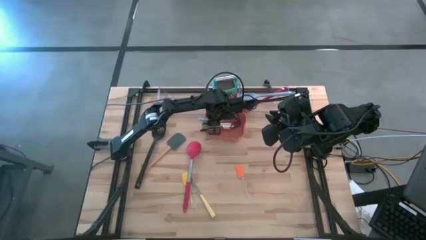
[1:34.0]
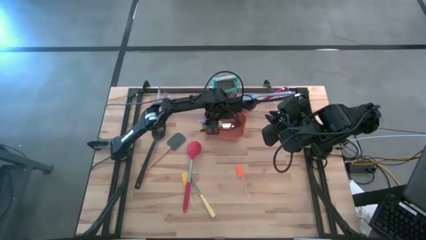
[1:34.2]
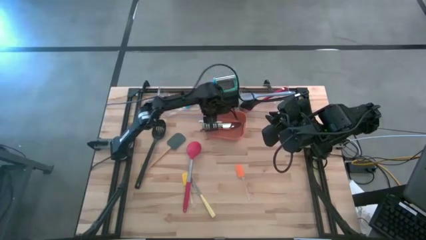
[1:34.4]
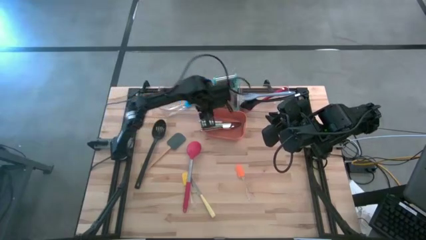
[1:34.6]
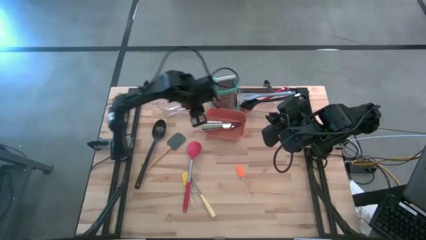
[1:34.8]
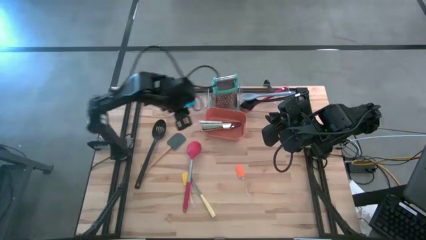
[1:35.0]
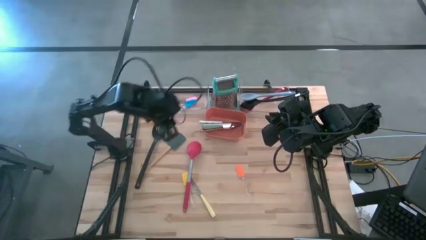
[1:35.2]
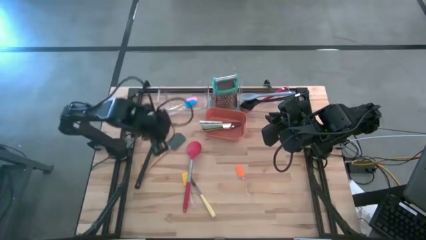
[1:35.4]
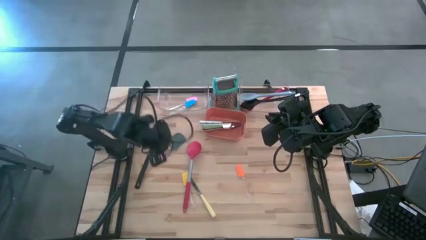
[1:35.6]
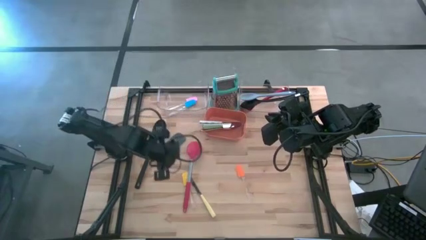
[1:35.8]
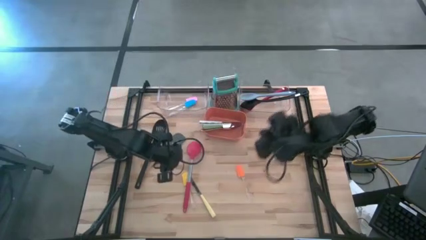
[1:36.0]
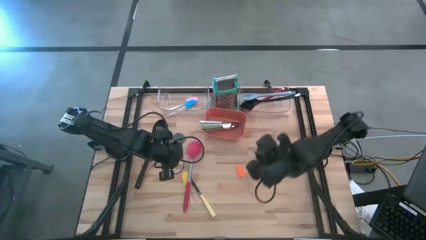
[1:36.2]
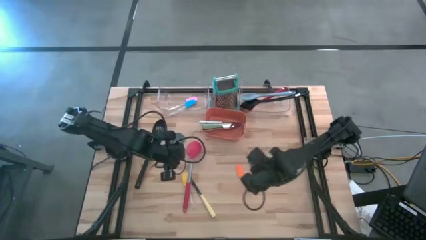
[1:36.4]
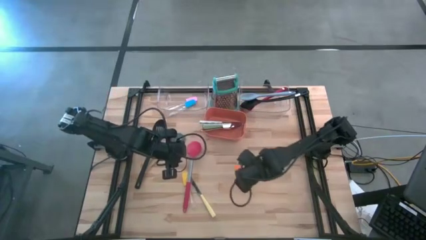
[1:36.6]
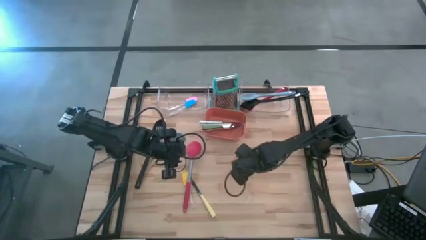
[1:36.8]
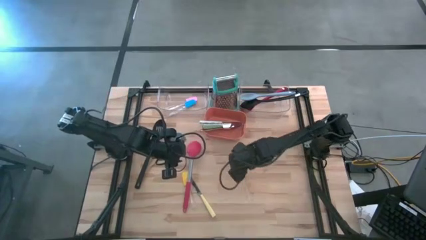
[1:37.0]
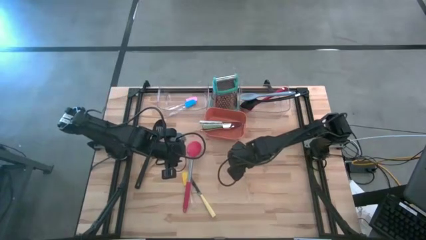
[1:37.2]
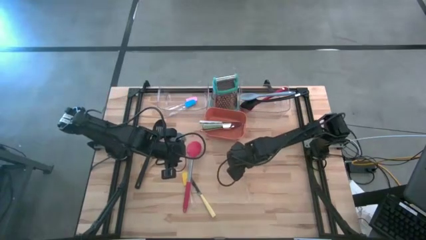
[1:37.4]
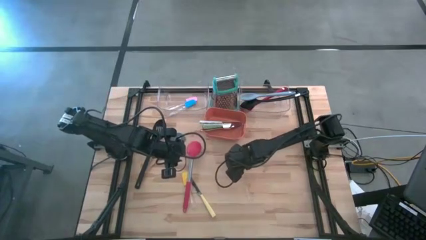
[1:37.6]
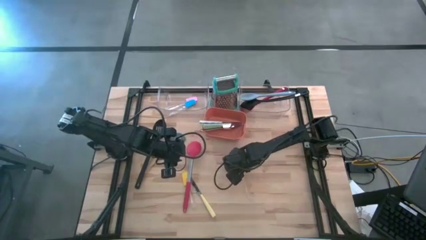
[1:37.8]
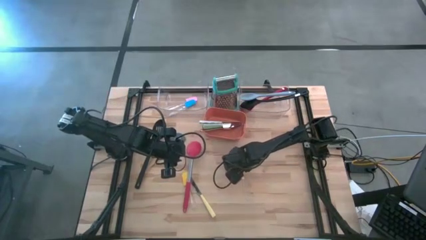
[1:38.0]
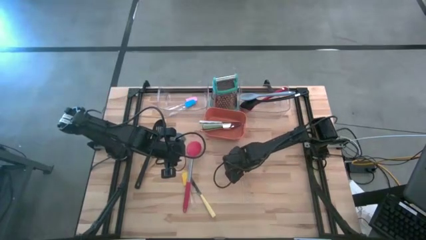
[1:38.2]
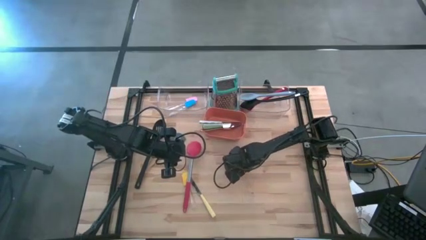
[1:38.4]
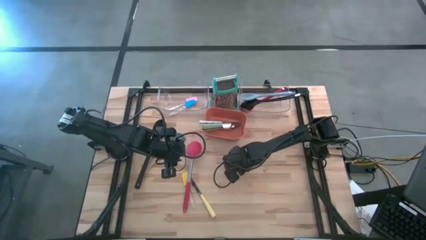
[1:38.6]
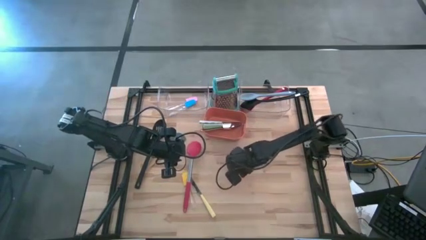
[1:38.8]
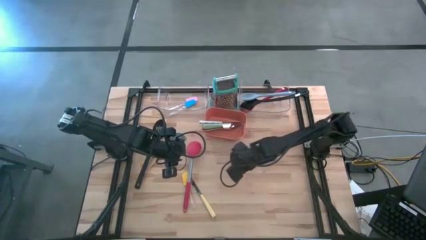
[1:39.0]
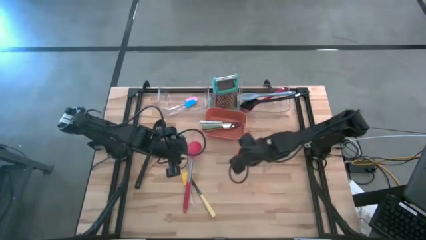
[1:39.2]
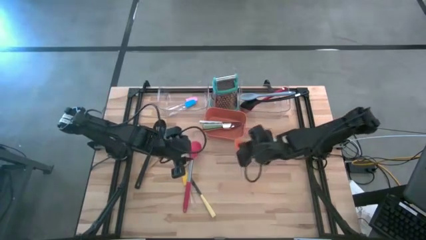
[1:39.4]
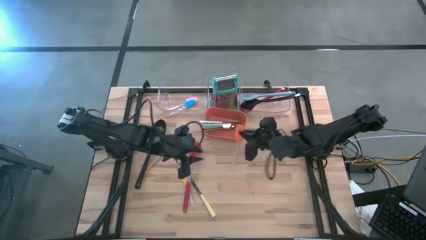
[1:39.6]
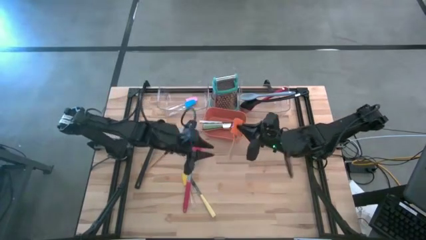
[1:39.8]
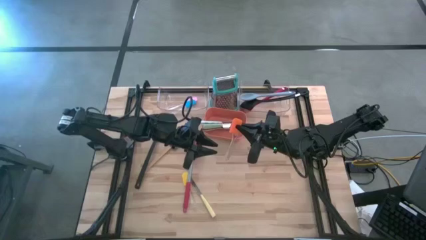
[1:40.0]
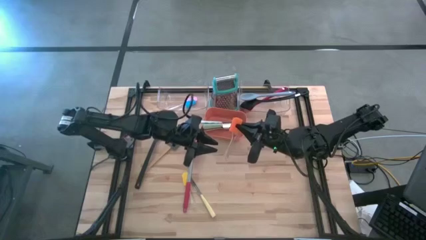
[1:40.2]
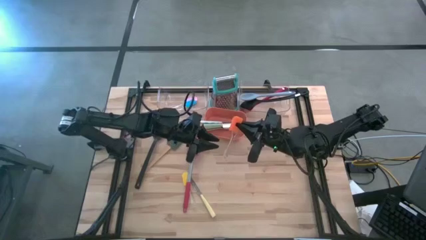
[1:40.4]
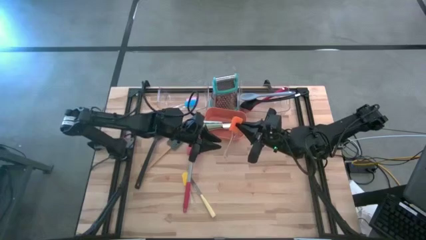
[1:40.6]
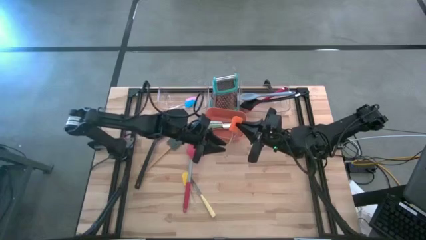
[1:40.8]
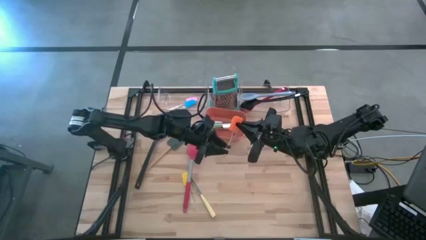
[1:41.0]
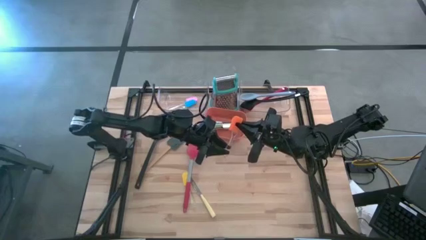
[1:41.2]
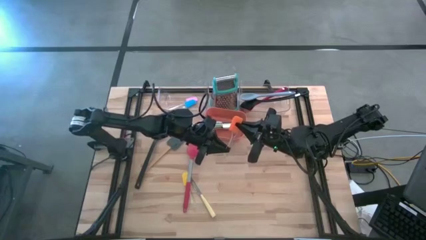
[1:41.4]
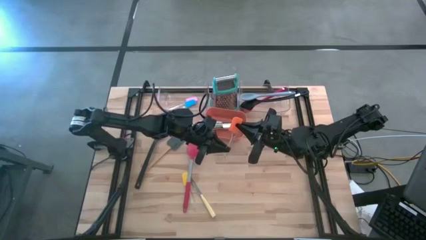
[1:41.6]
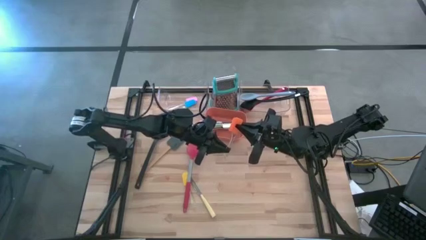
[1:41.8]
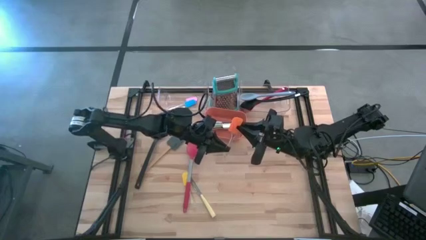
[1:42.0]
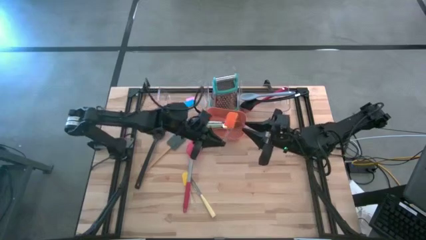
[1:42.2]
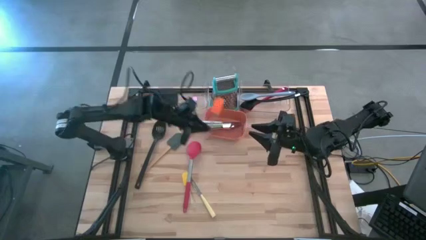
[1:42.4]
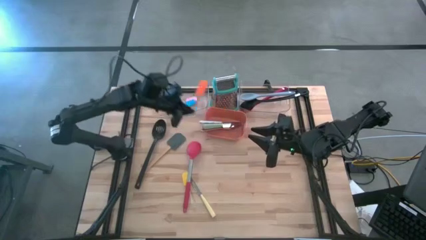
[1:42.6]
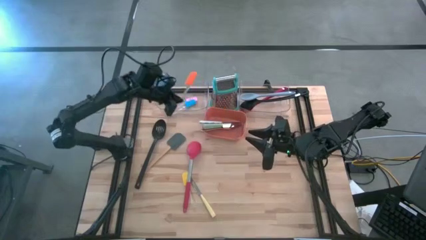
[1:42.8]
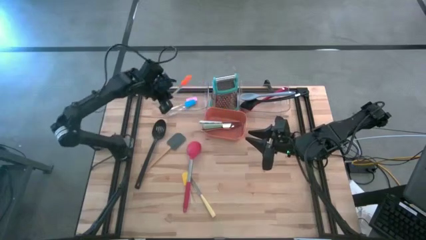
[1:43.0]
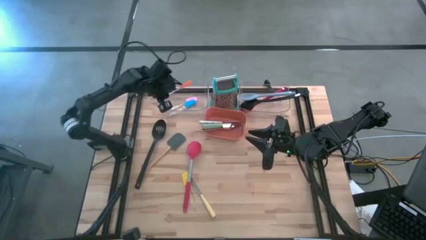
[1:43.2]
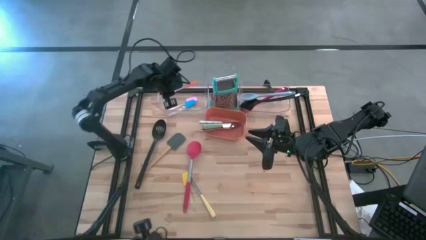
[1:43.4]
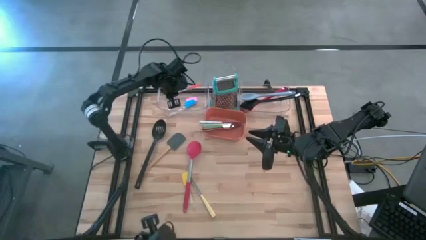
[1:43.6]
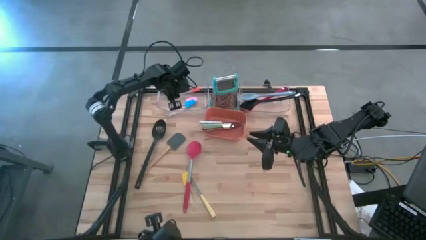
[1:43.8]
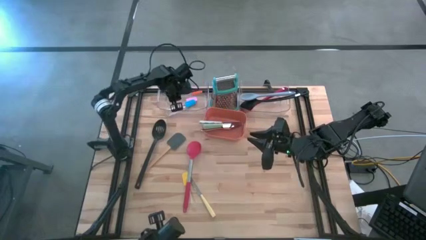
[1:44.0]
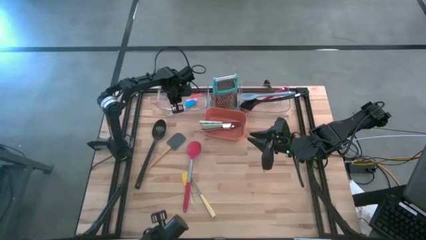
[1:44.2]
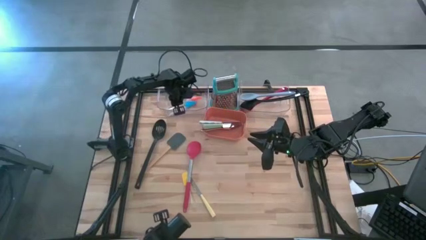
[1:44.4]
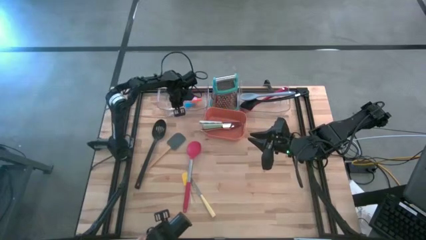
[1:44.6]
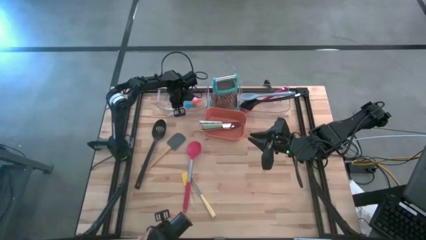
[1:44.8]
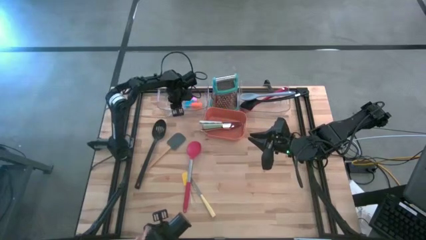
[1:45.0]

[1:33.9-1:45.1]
Task: Pick & Place Kitchen Items
Put the orange spatula into the left transparent bin

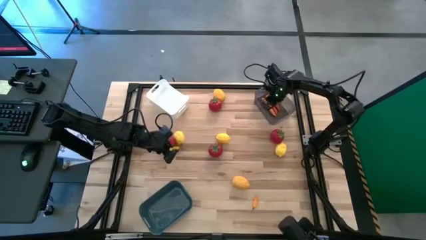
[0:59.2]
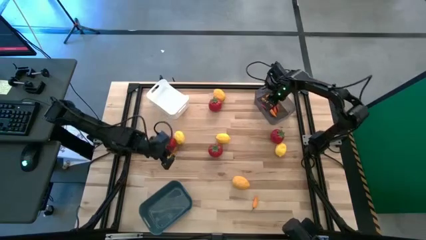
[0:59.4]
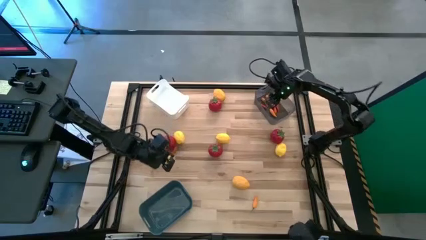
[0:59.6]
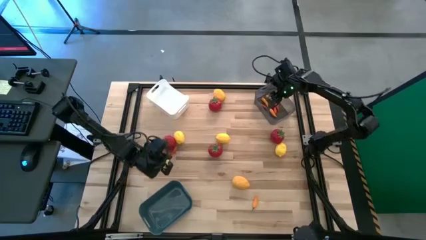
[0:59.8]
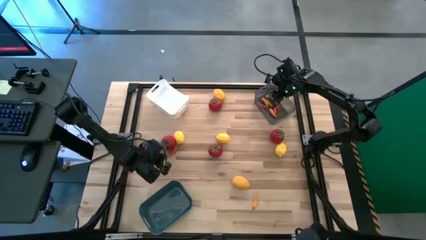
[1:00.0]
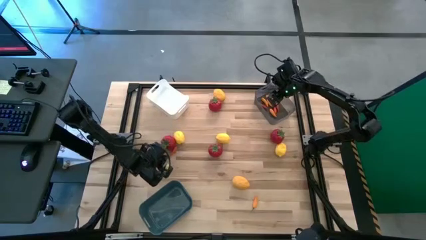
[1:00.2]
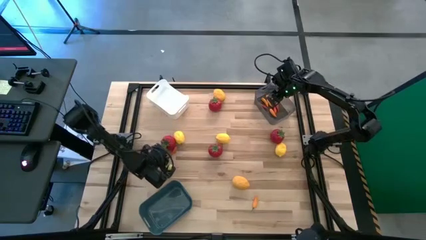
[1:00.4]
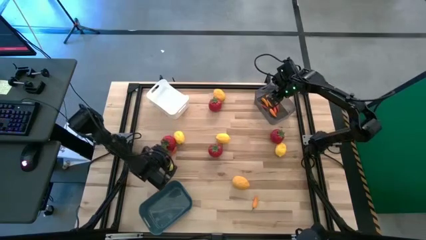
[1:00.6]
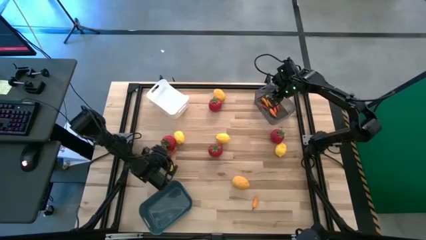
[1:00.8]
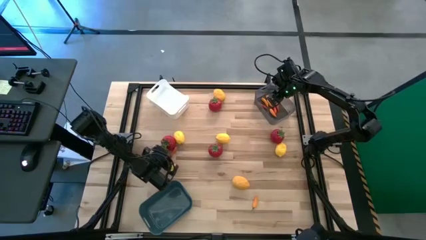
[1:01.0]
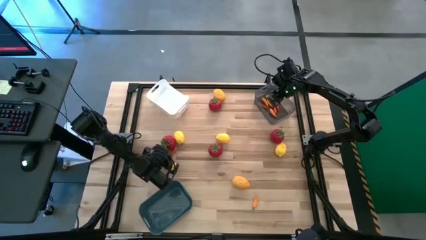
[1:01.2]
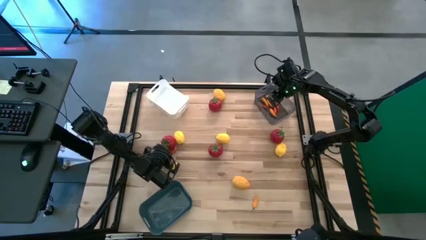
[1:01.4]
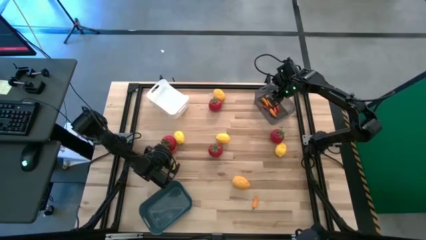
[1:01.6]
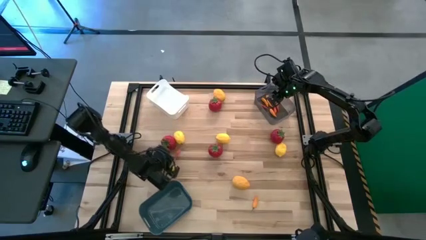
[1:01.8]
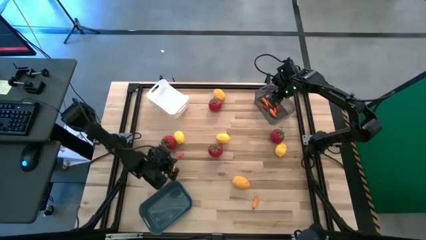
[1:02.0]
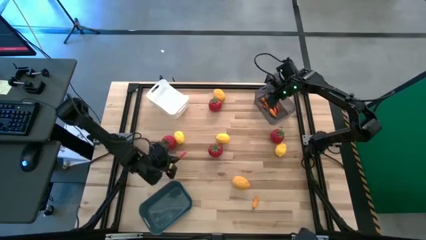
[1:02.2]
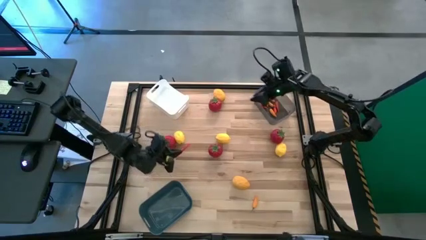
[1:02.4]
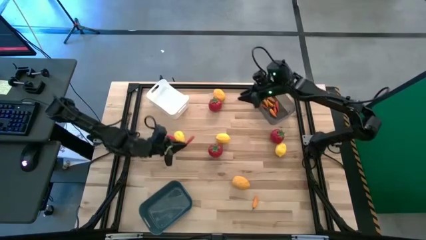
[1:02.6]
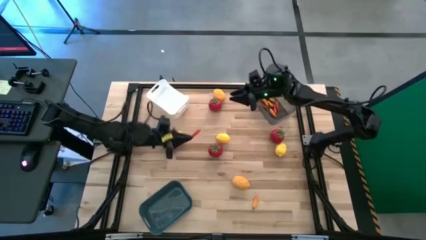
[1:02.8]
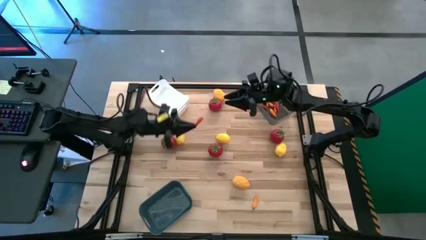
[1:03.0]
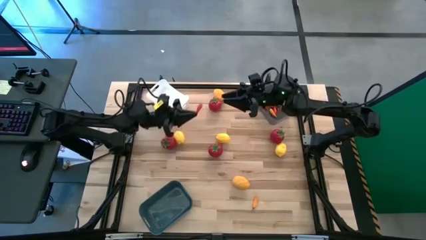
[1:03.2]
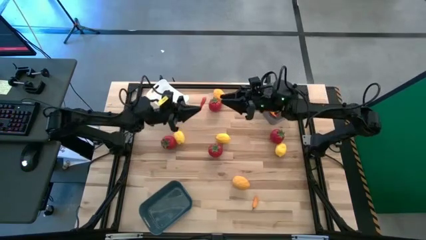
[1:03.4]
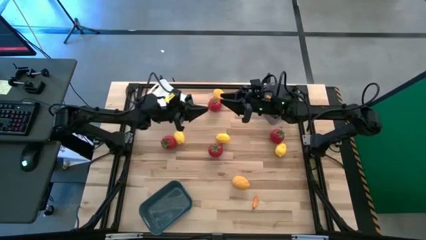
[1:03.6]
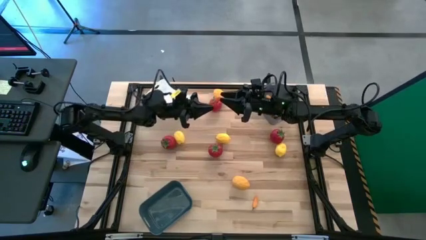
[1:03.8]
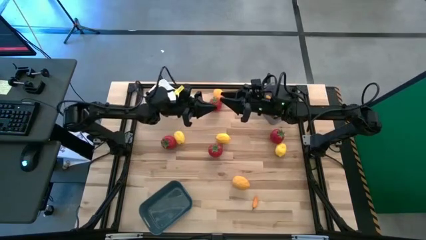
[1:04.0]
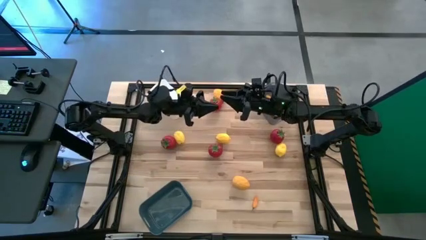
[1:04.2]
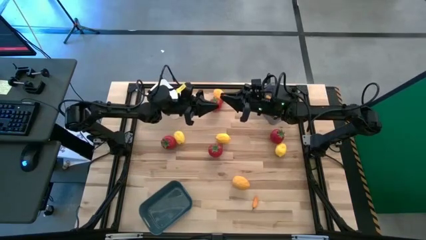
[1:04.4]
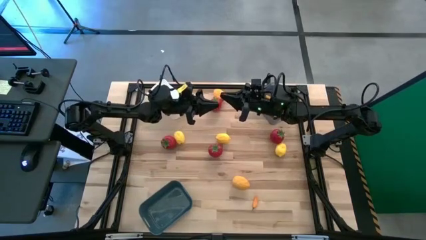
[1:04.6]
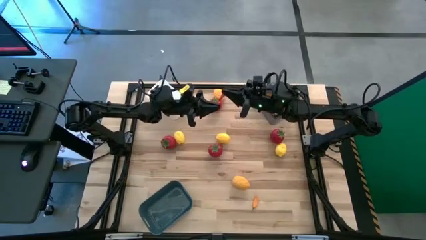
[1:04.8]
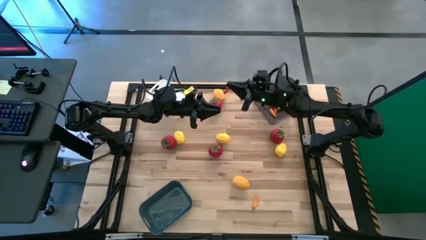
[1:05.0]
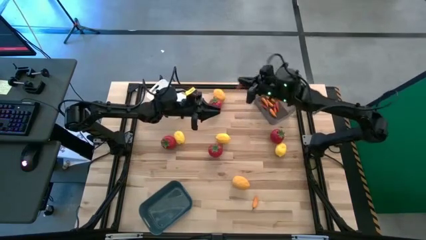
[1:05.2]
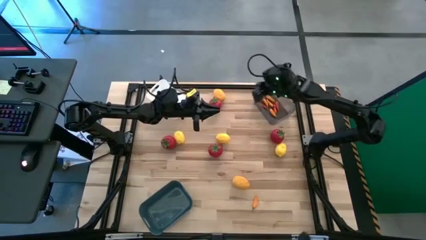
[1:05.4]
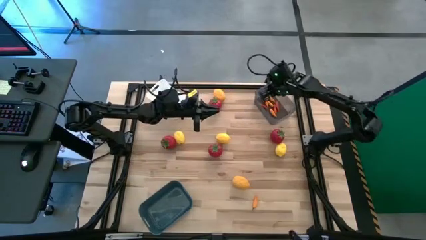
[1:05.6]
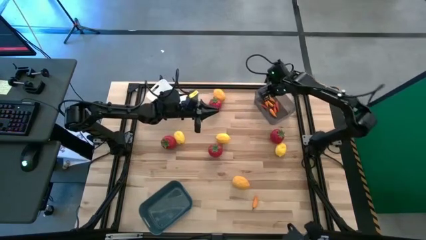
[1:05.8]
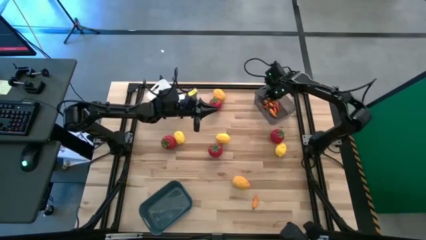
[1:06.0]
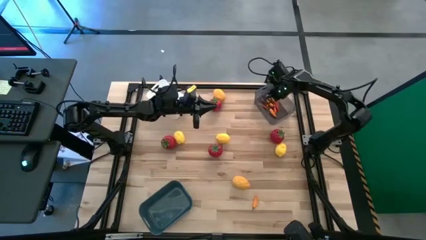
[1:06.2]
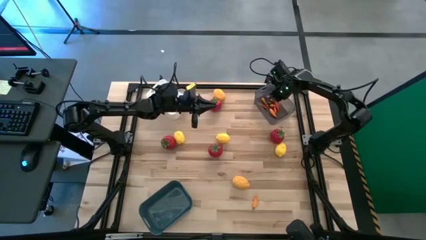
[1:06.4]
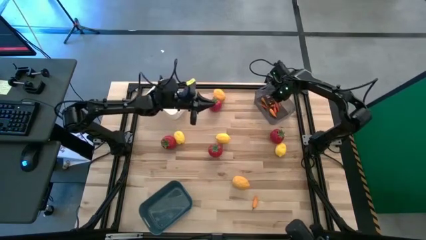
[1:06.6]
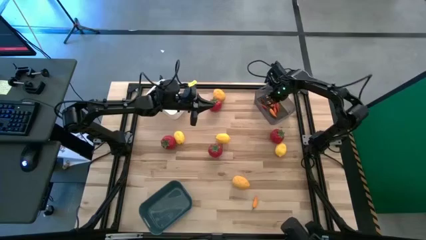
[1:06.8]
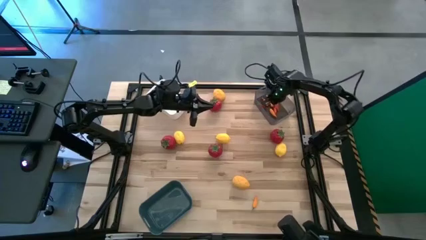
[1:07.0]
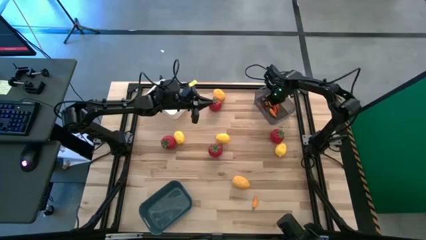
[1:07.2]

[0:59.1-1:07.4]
Task: Sort produce into baskets
Put the red chili pepper into the black transparent bin
